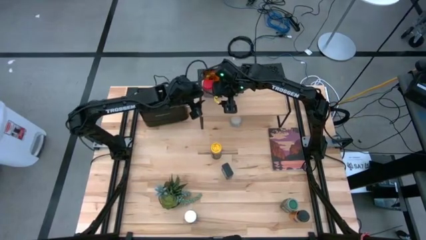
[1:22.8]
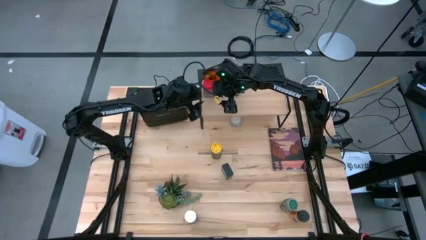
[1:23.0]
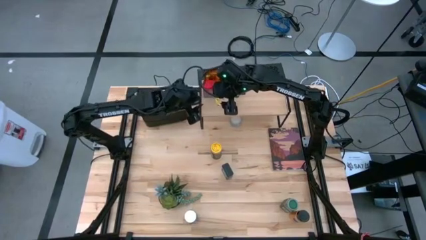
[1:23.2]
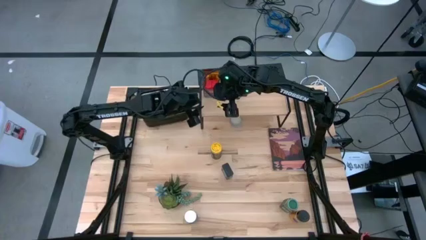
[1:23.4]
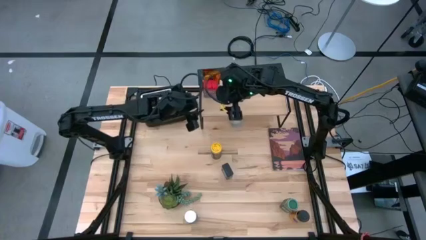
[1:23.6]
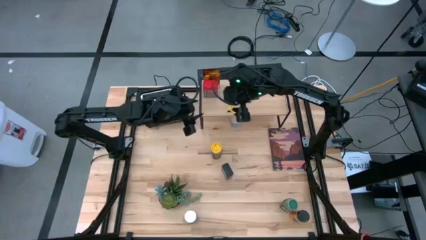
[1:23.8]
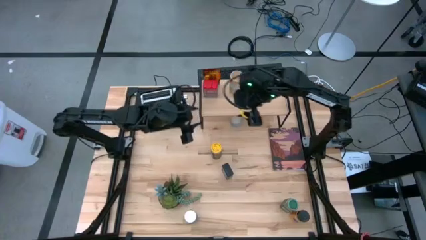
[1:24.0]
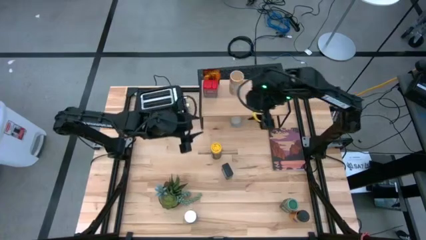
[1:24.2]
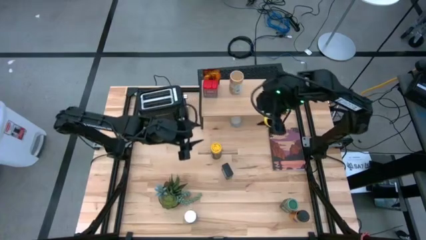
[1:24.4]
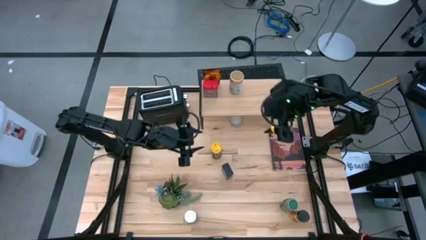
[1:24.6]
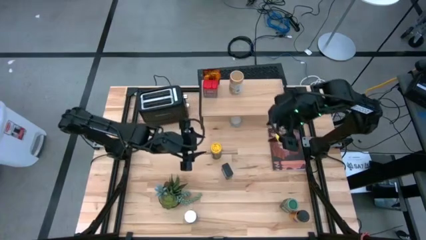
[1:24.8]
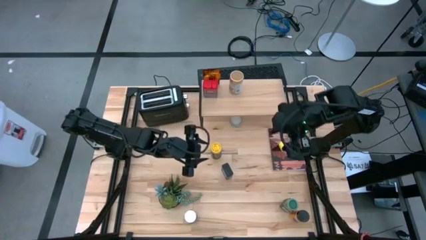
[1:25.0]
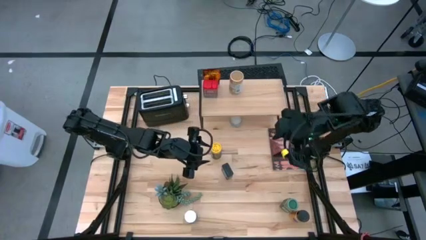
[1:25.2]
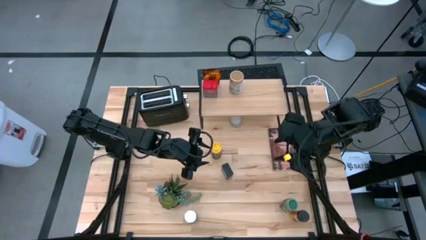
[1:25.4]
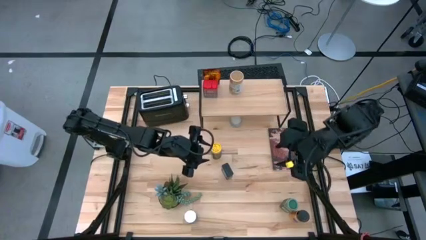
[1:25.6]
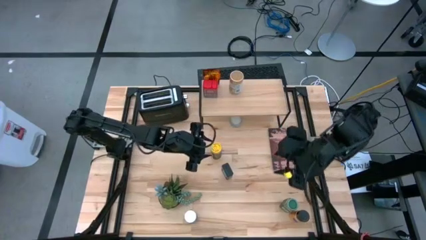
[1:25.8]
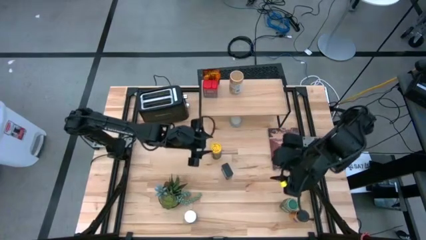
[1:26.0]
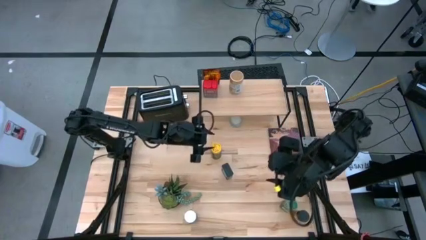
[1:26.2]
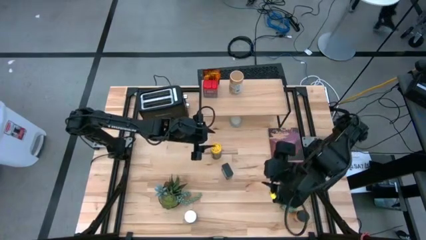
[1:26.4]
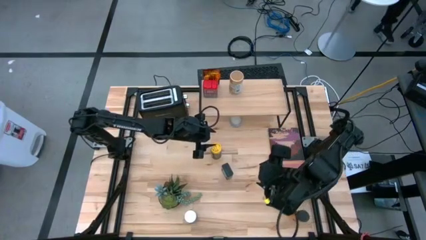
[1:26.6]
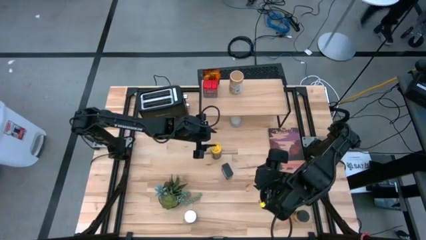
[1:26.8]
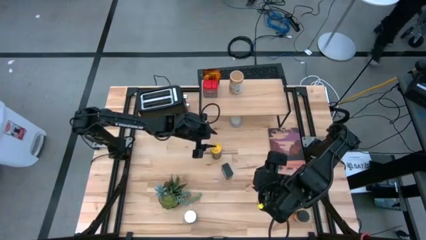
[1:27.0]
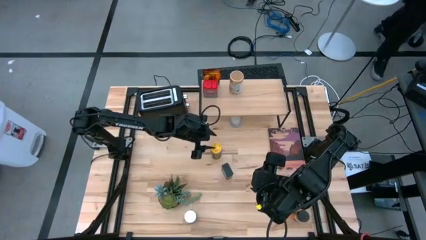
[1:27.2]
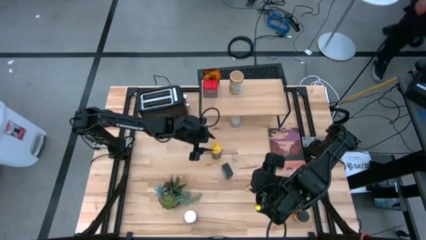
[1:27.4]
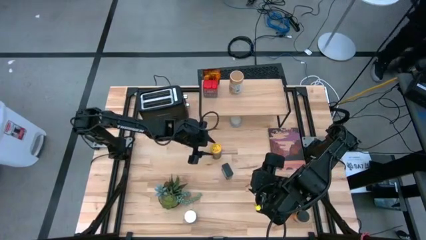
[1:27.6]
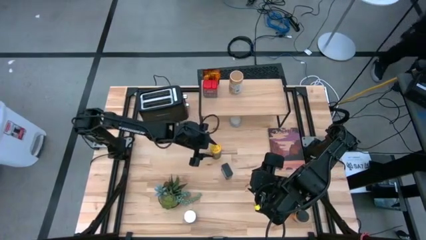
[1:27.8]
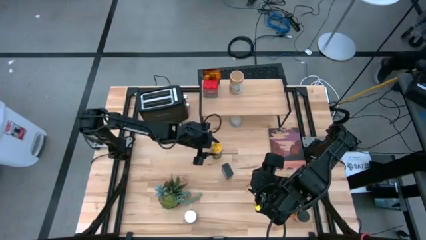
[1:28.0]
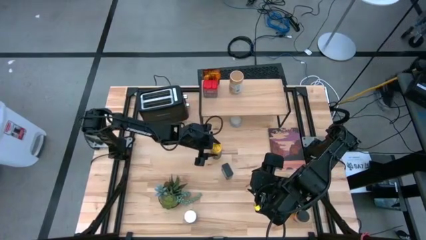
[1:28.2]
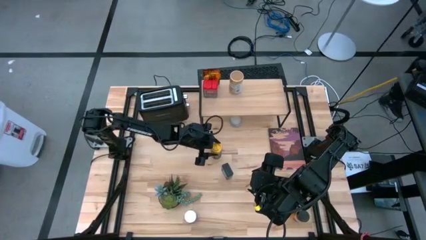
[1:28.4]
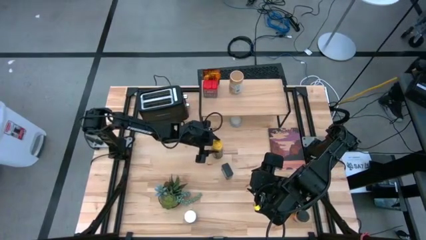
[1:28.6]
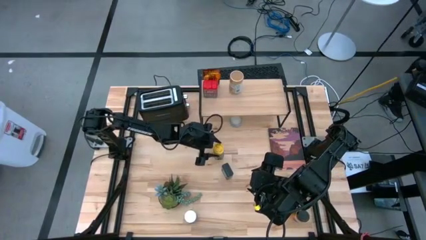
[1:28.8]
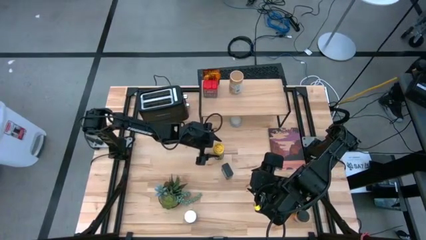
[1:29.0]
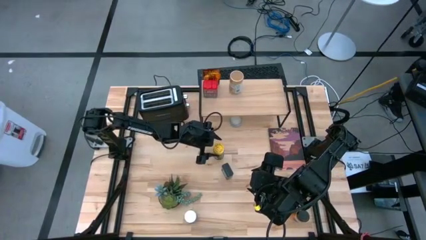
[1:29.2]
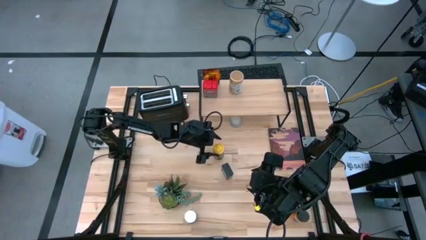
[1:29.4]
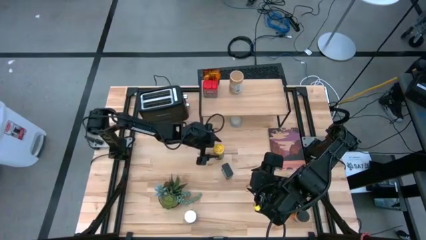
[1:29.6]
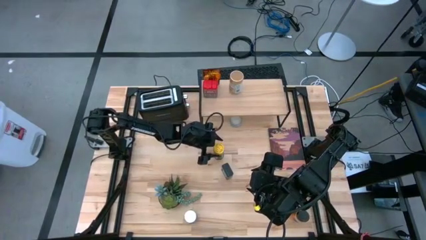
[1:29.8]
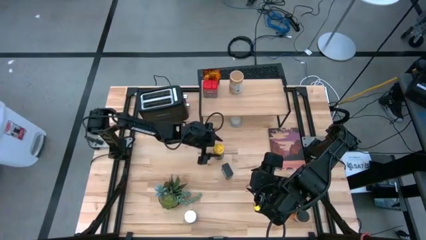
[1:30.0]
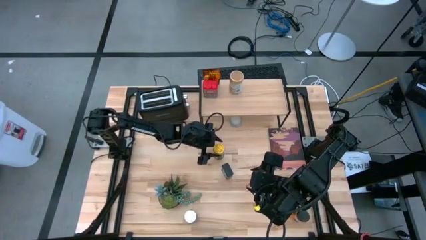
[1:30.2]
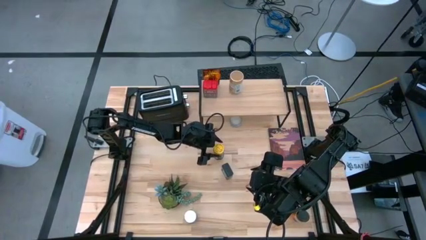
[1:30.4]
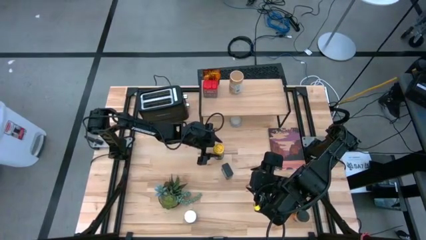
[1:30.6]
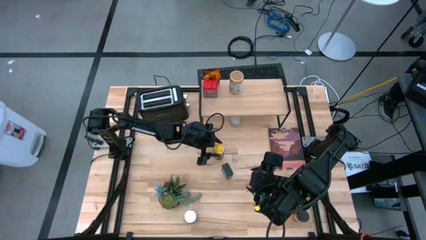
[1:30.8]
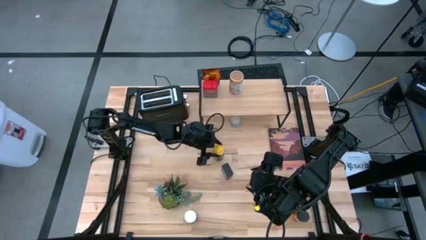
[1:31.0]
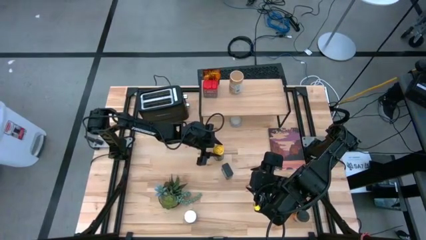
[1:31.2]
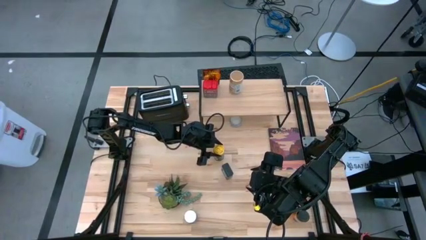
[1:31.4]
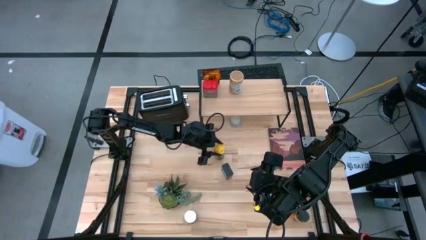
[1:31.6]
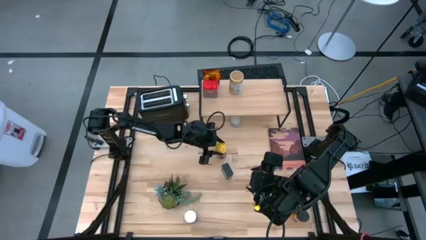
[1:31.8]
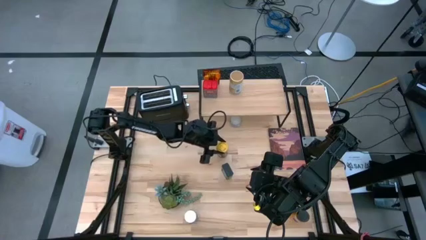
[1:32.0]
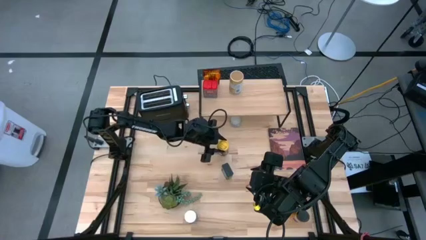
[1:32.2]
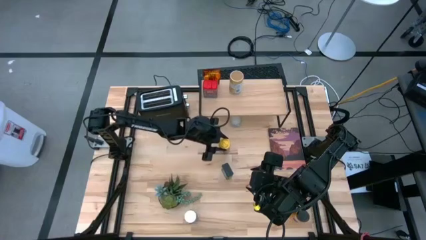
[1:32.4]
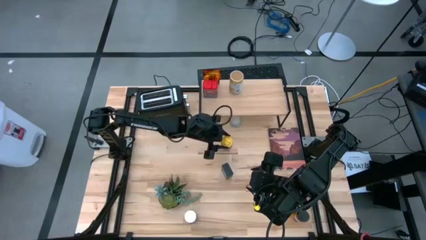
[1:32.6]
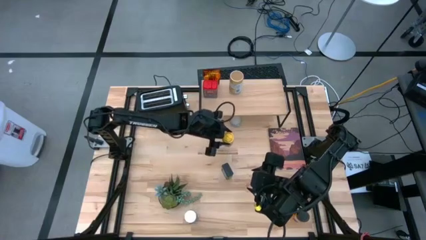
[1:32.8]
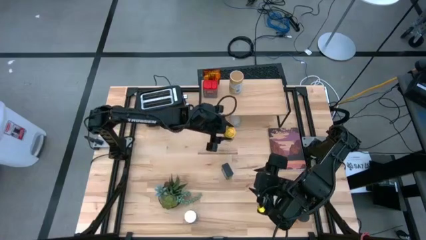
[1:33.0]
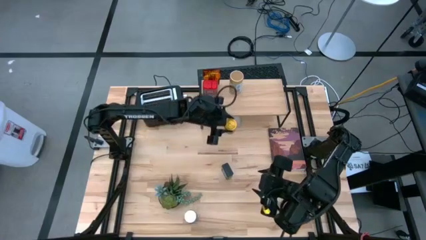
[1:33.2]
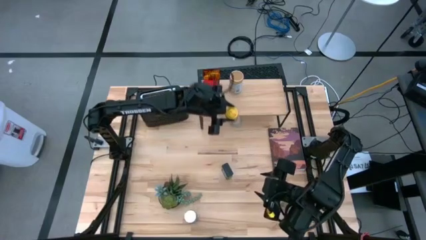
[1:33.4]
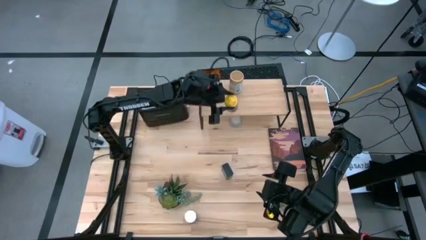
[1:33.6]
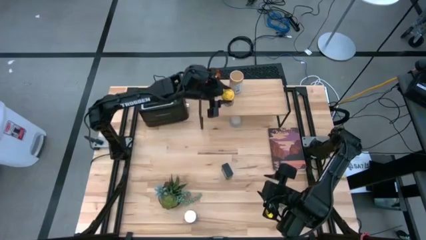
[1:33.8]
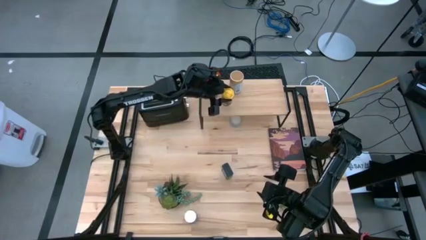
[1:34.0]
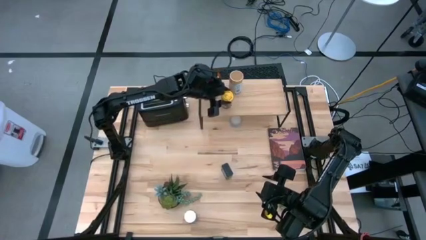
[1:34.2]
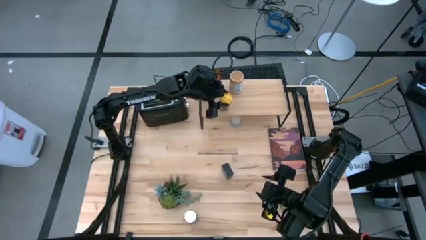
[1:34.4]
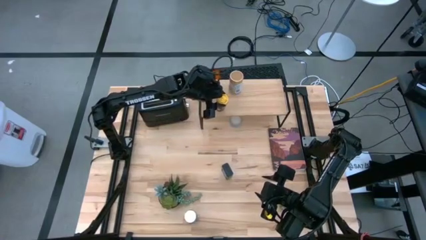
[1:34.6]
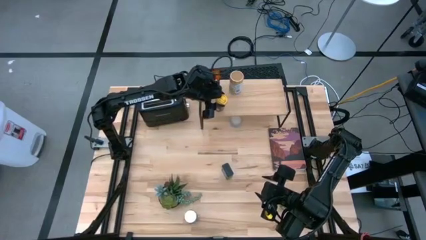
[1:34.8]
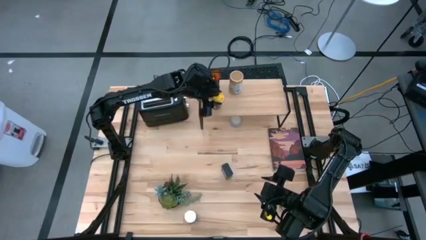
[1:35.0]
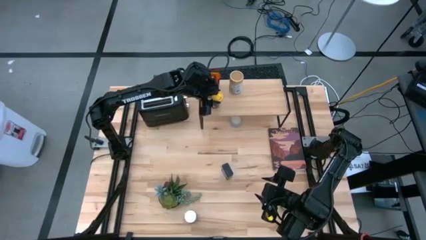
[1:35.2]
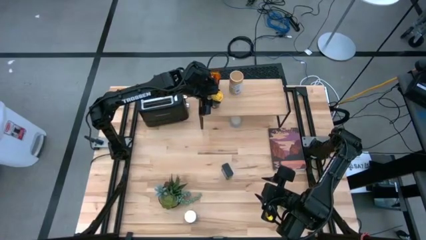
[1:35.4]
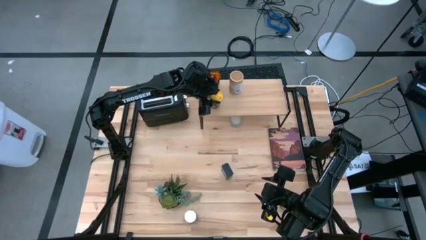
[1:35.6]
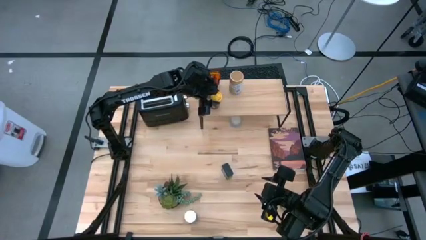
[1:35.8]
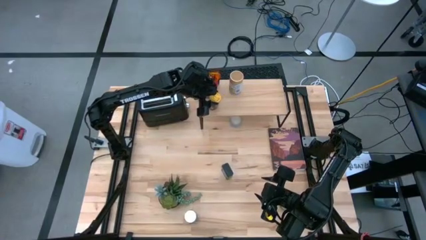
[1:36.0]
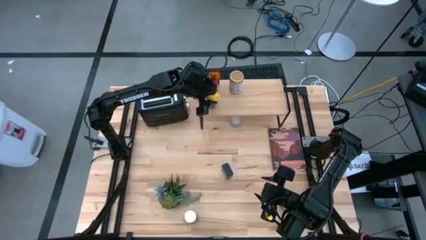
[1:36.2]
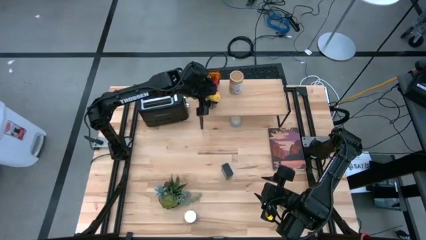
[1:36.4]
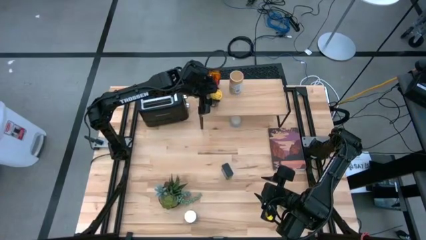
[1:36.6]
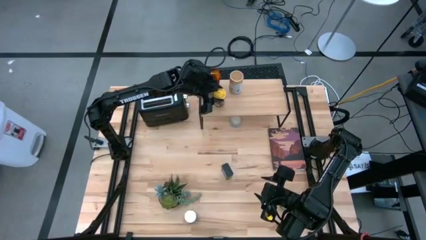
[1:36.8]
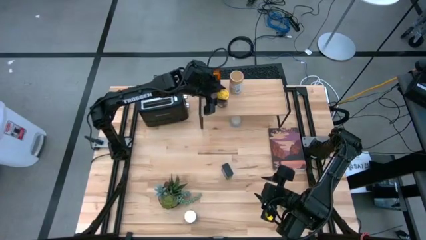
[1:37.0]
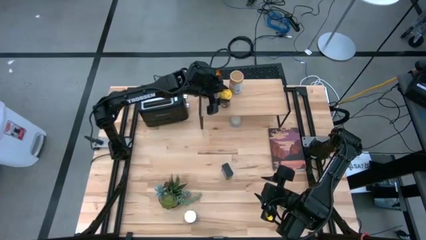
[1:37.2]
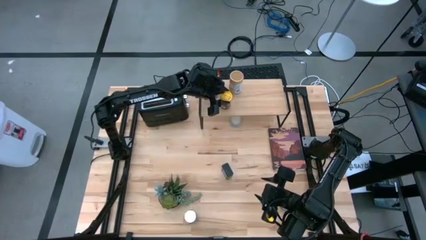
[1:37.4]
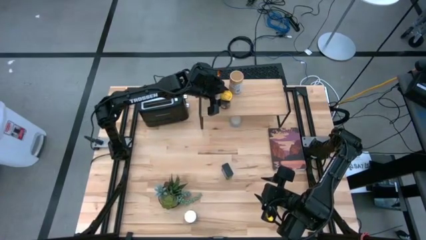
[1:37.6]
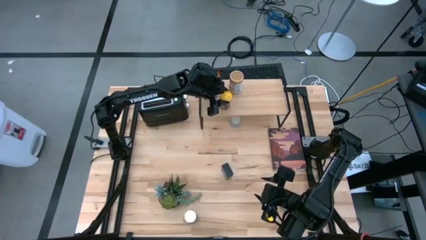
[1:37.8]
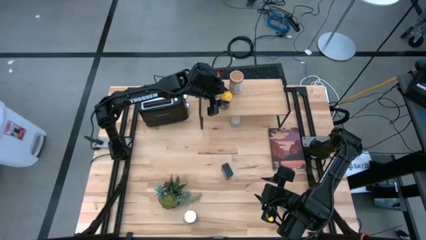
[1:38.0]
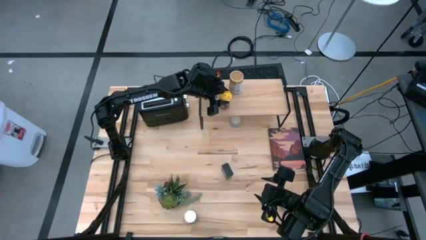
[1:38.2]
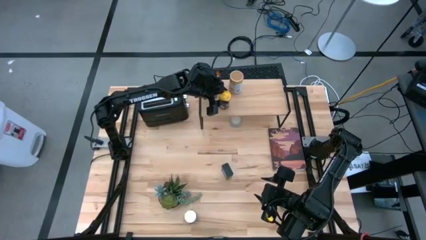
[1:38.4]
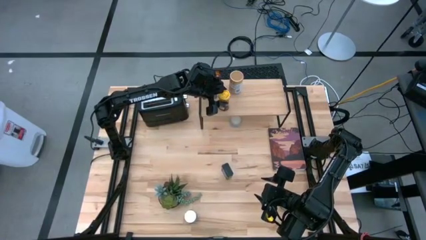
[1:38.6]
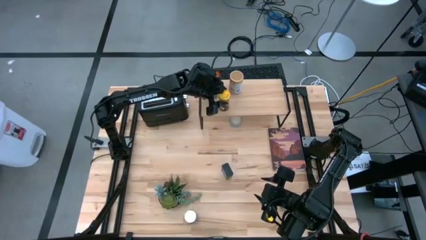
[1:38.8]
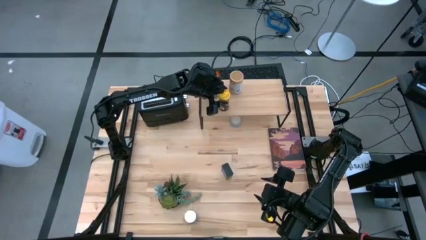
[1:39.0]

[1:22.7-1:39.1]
Task: Shelf spices
Put the yellow seasoning bottle on the shelf
